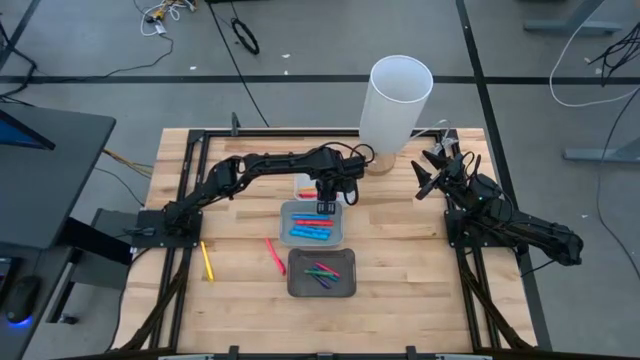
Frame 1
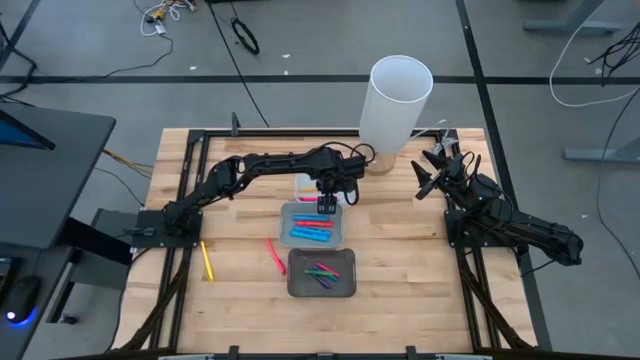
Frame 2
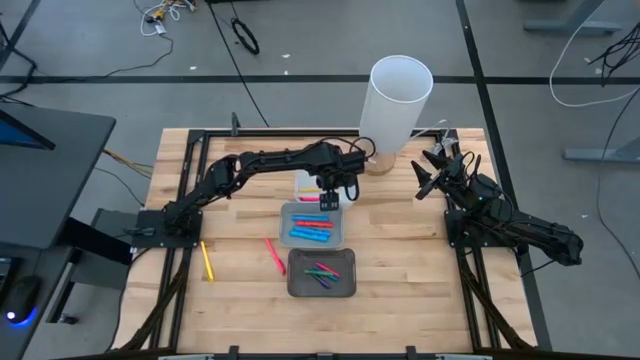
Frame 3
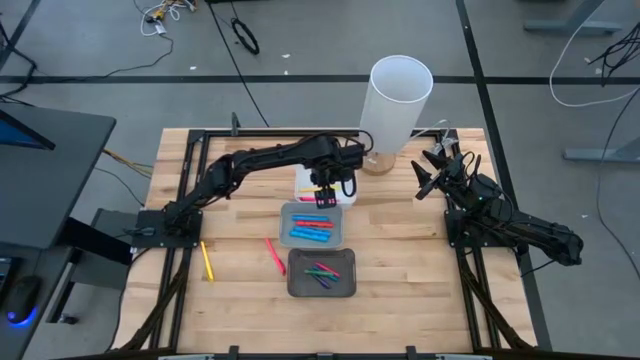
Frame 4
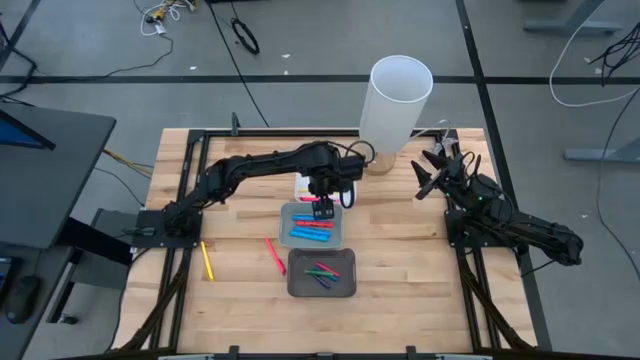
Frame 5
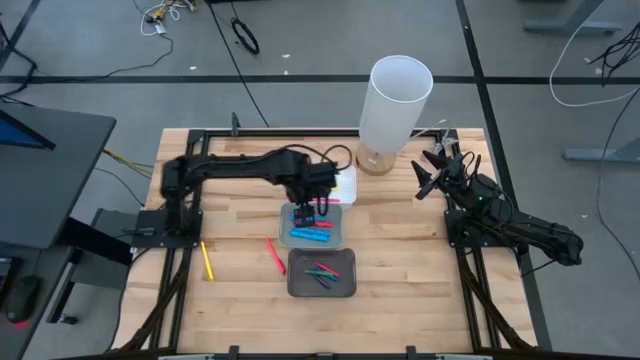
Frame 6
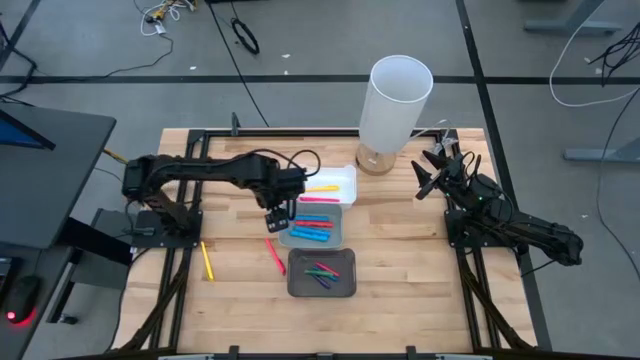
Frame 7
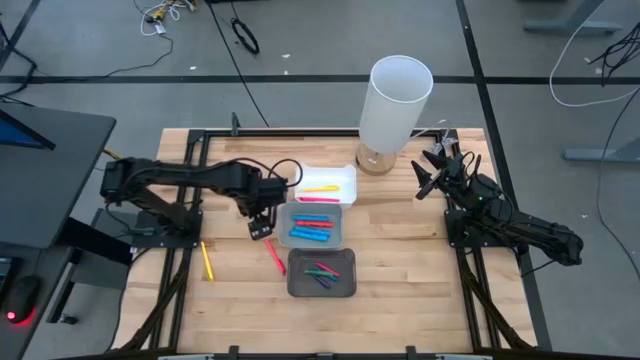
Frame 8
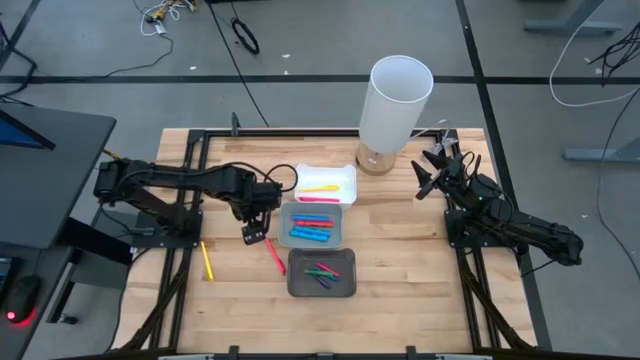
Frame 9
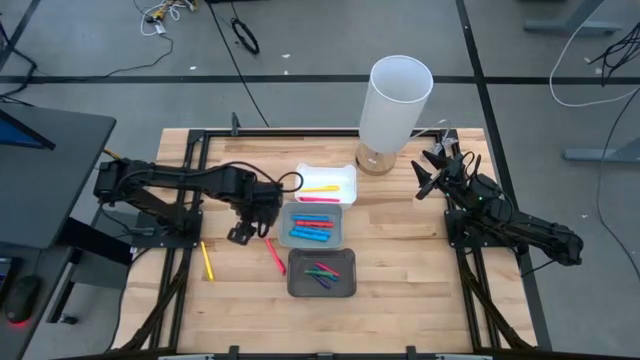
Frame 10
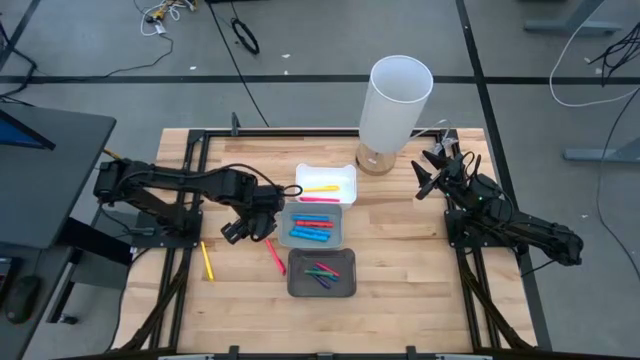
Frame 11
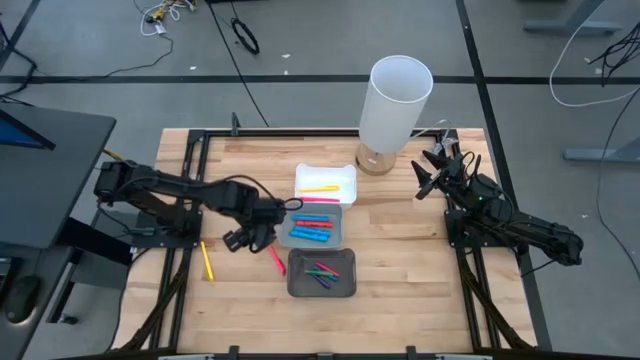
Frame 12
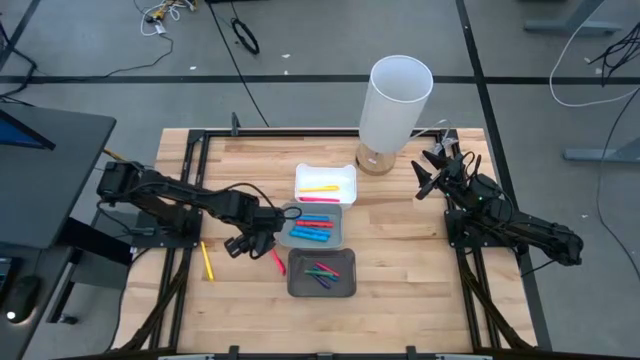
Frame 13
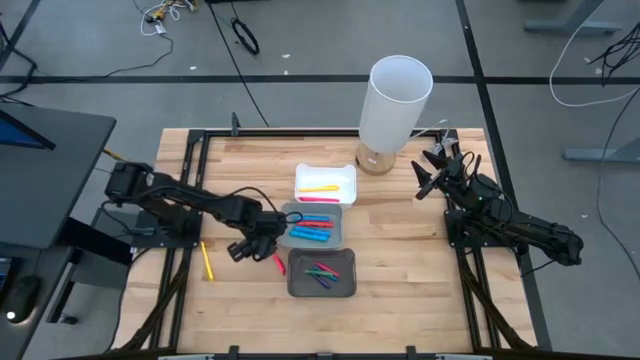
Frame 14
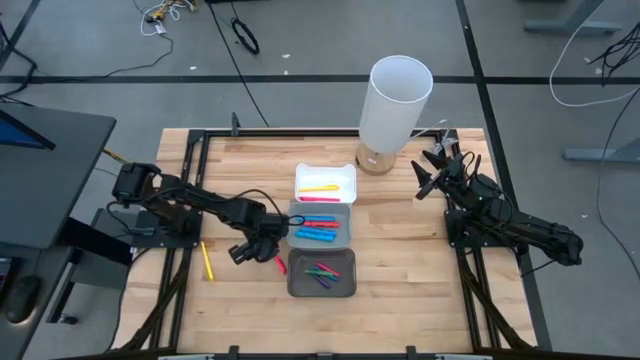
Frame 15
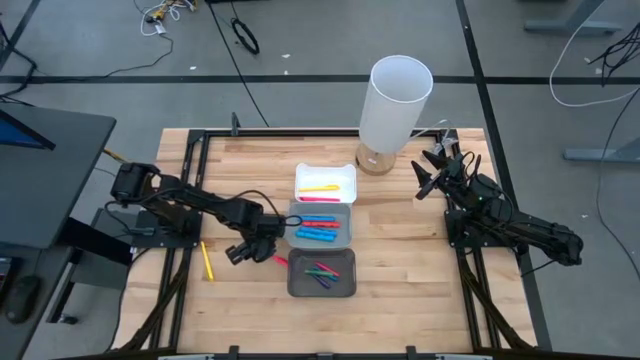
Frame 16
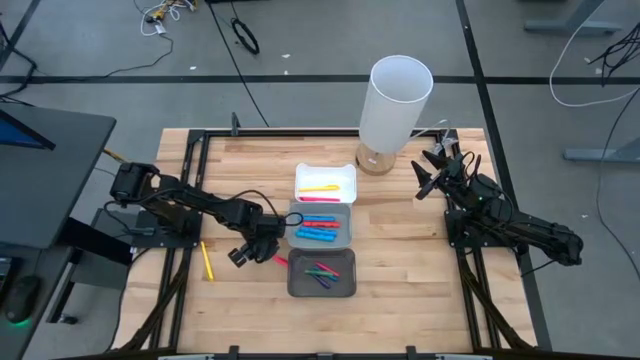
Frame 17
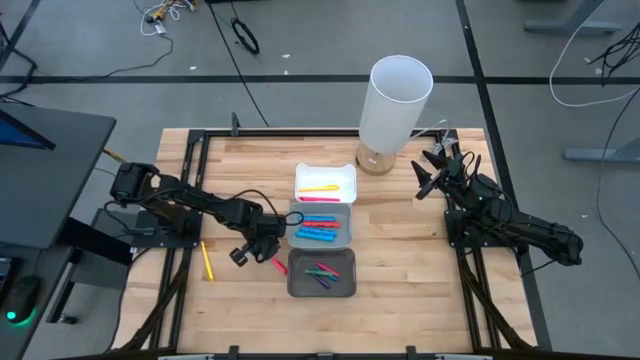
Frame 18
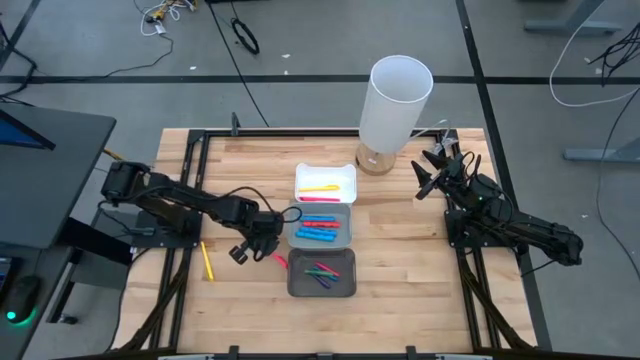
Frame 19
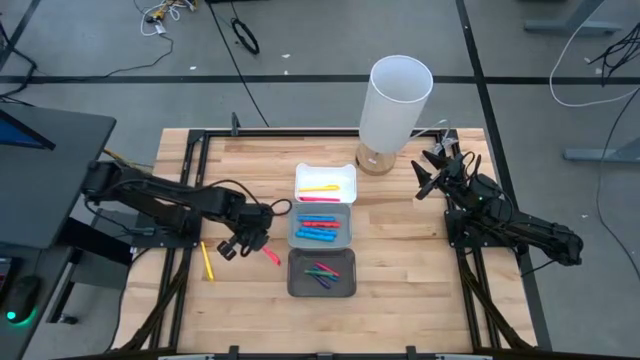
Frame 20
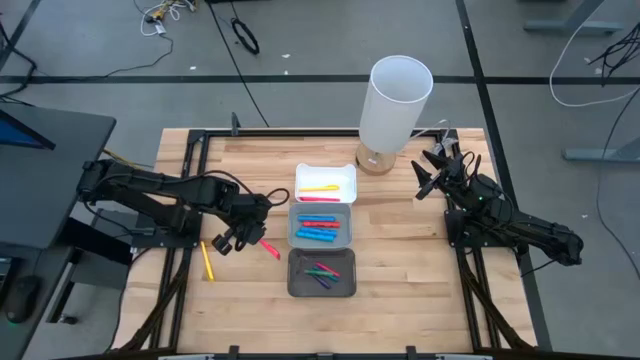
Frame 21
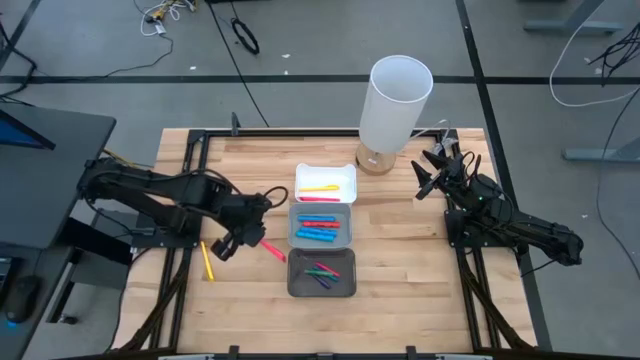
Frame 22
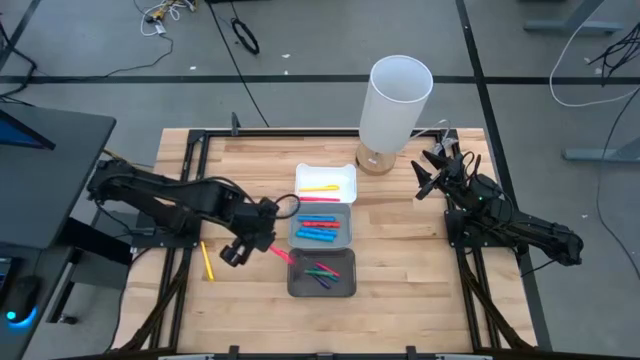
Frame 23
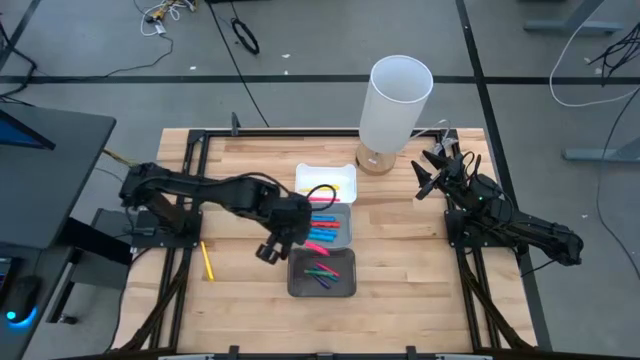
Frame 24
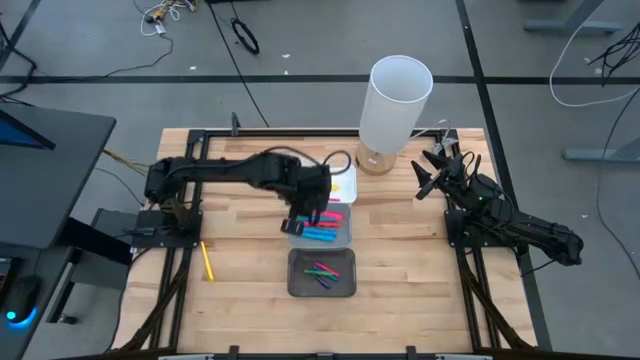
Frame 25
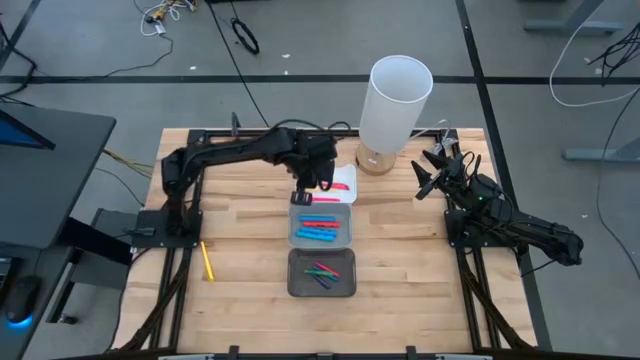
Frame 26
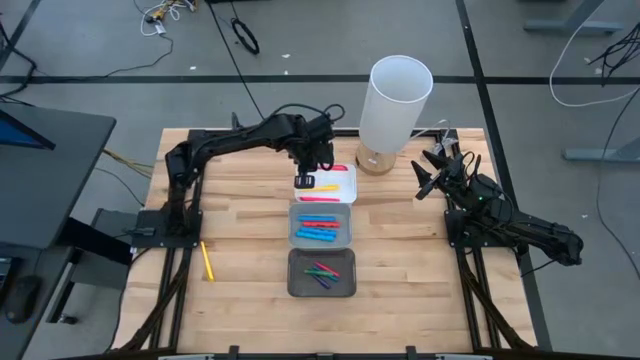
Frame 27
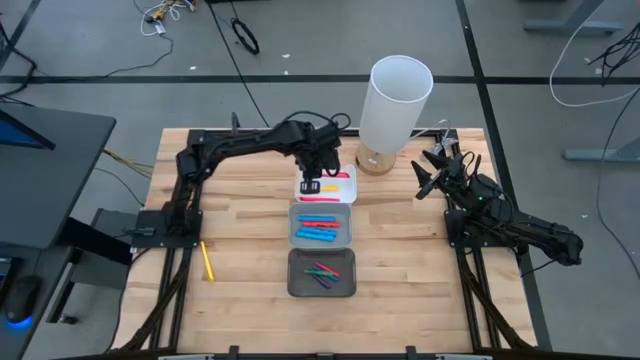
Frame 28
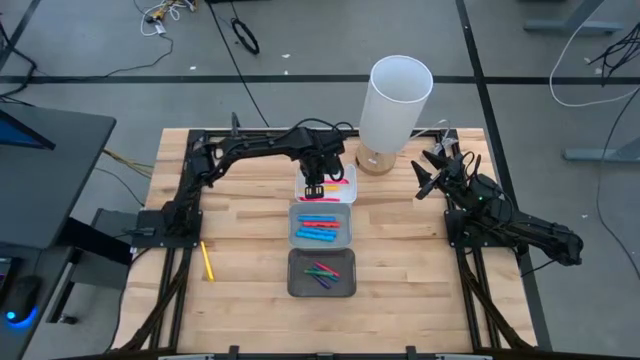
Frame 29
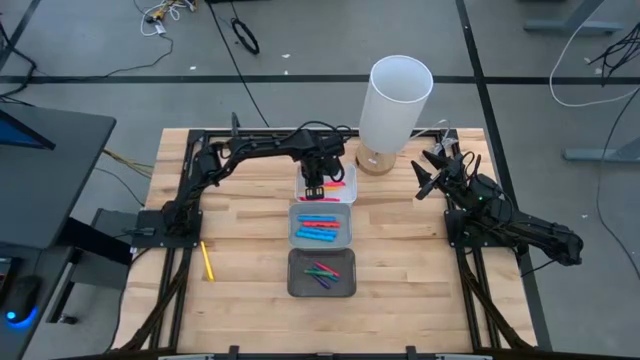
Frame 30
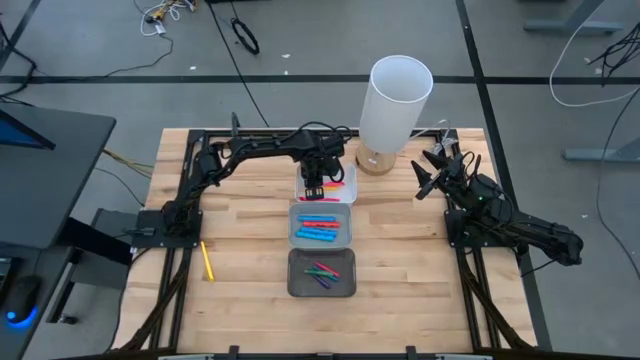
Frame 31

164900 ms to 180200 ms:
Task: Pick & Place Markers
Put the pink marker pen into the white bin

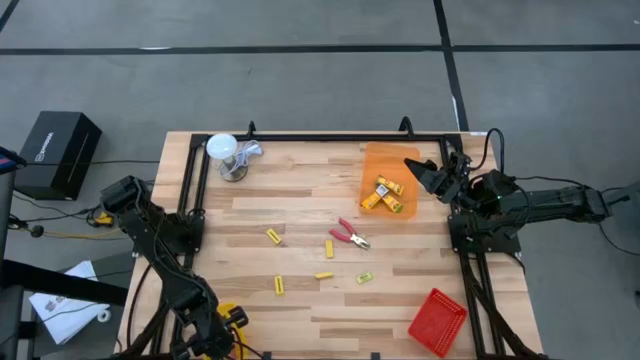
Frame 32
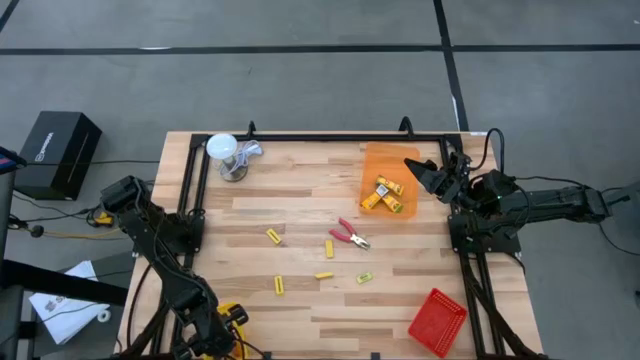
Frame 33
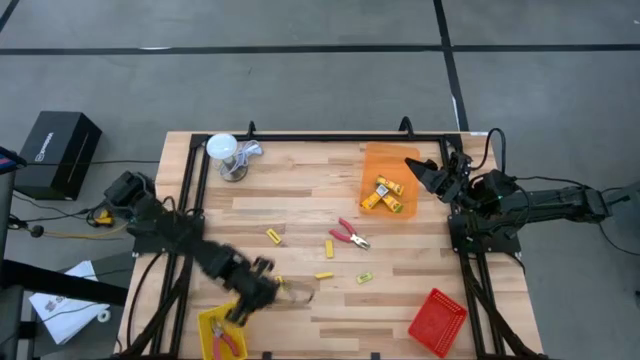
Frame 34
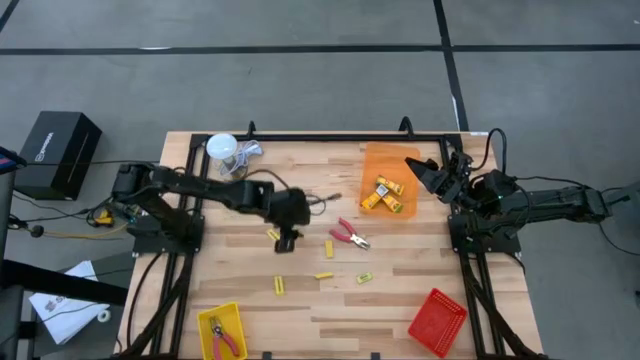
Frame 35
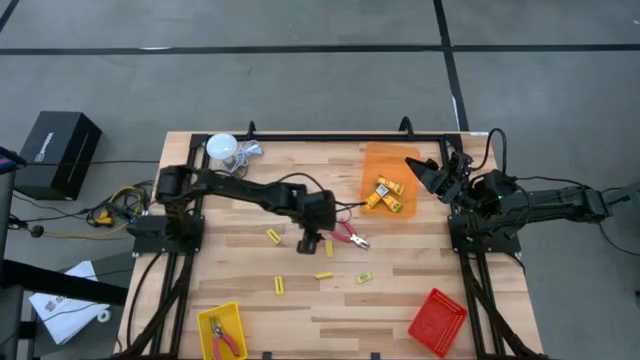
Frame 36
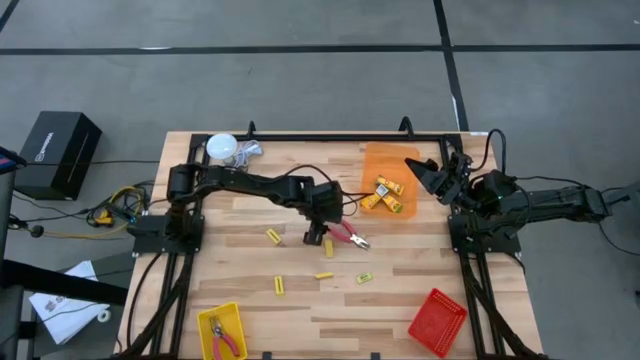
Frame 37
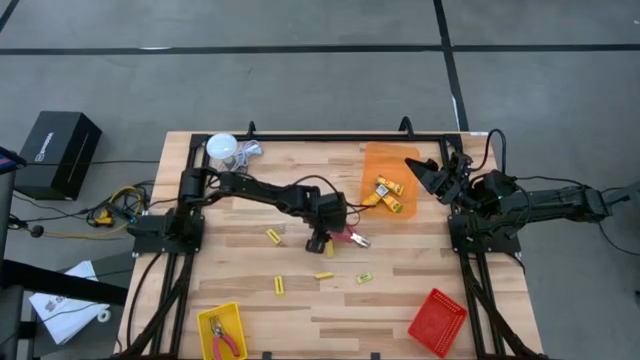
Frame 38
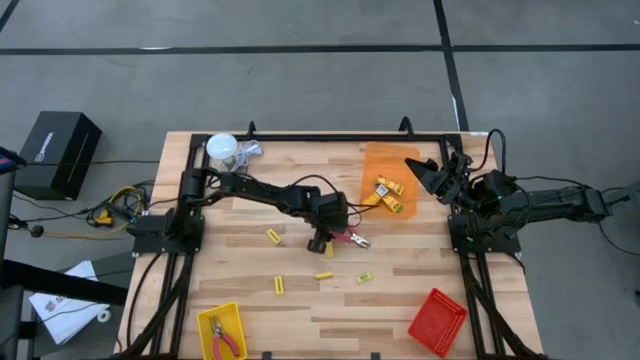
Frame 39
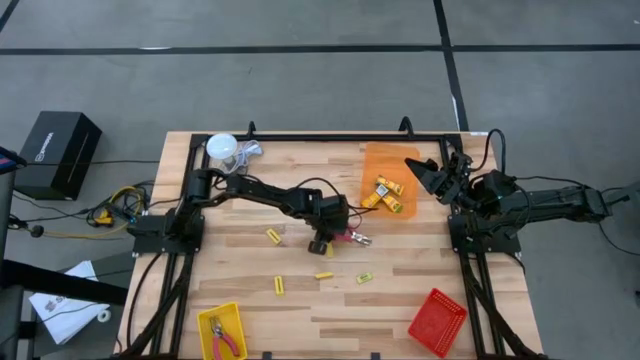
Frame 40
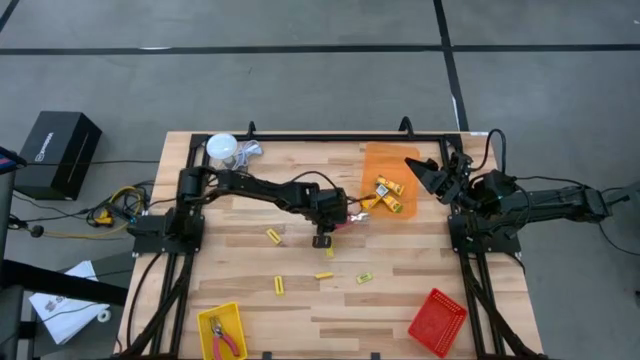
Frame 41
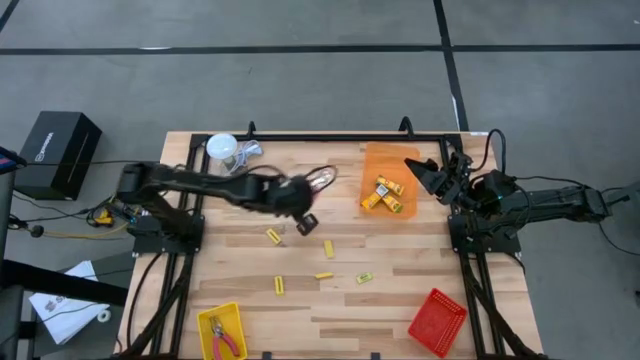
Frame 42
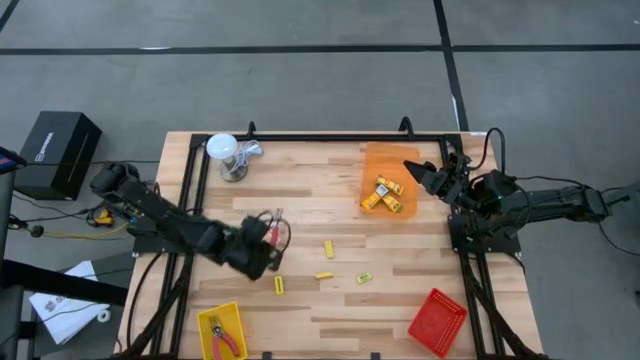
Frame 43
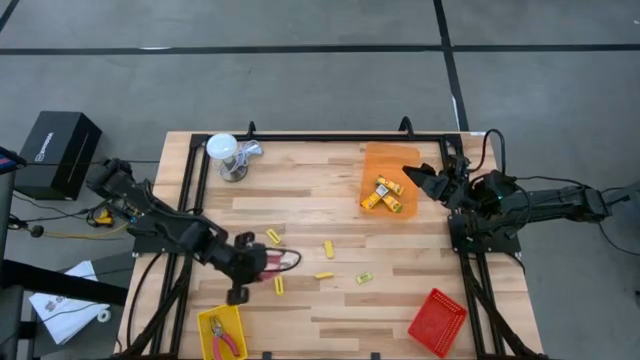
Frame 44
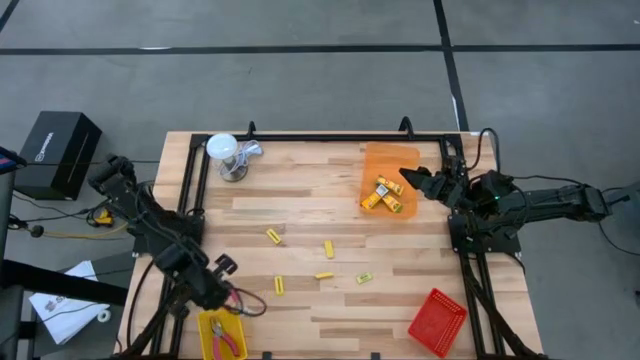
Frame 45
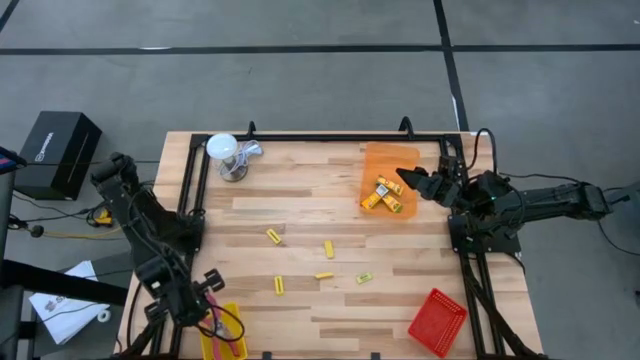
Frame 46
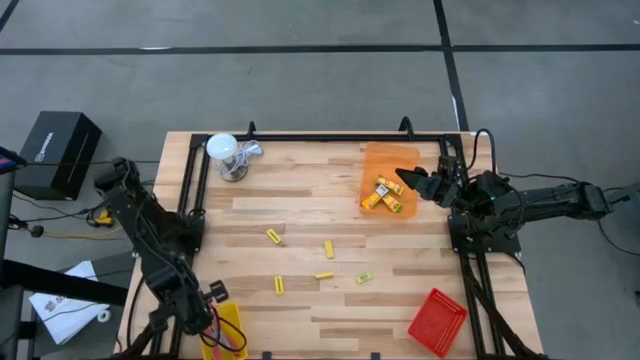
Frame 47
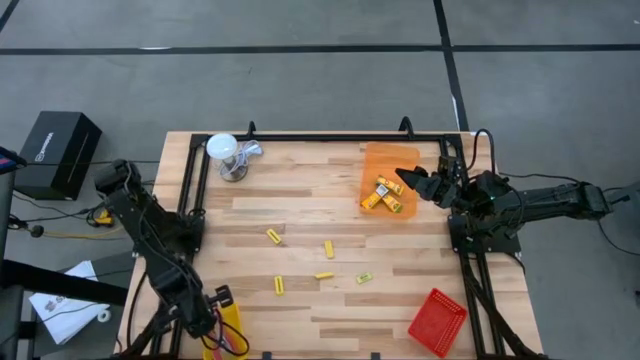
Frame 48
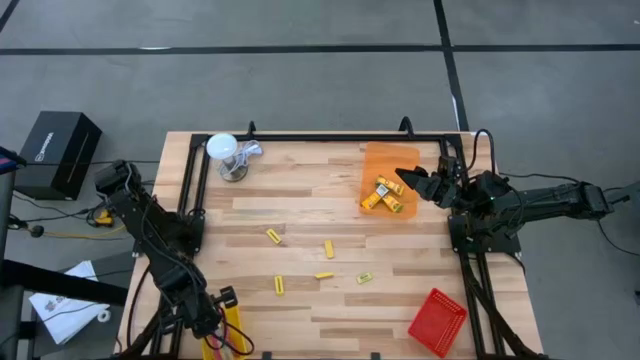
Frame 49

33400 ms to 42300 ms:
Task: Pick & Place School Supplies
Put the pink pliers into the yellow bin
